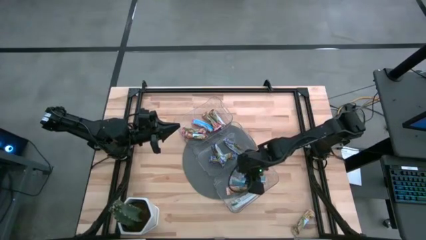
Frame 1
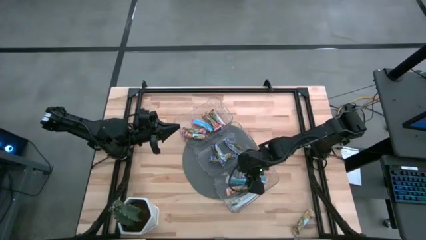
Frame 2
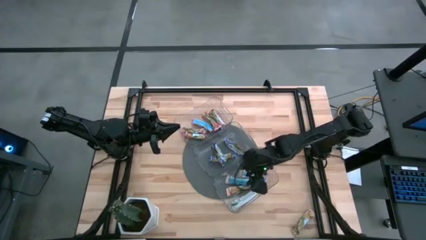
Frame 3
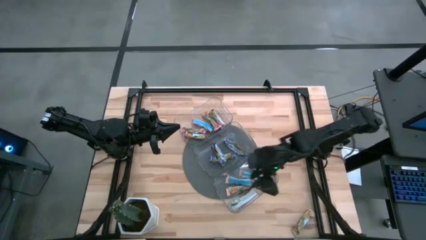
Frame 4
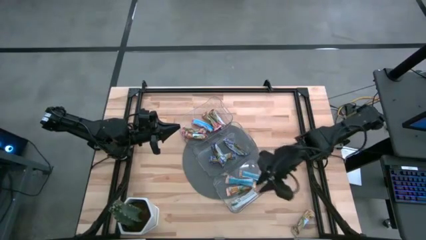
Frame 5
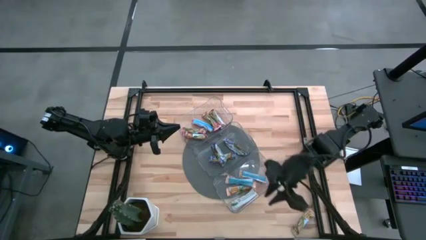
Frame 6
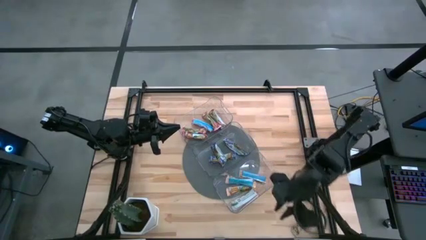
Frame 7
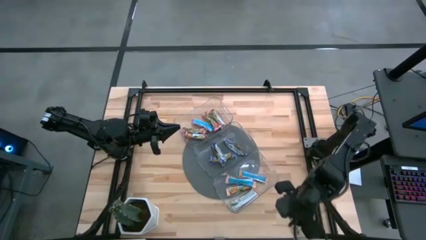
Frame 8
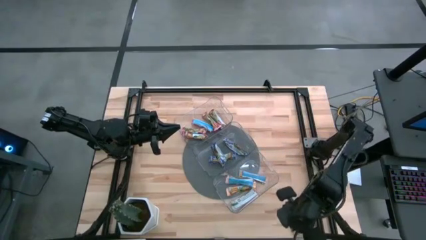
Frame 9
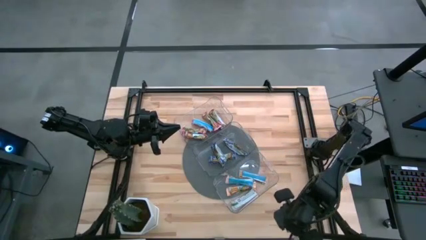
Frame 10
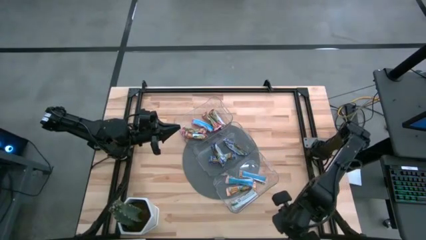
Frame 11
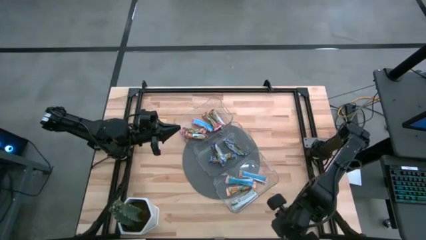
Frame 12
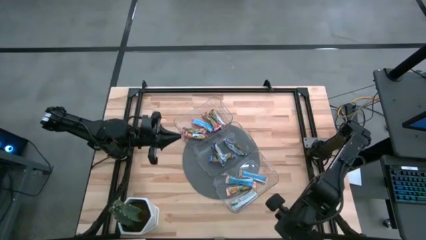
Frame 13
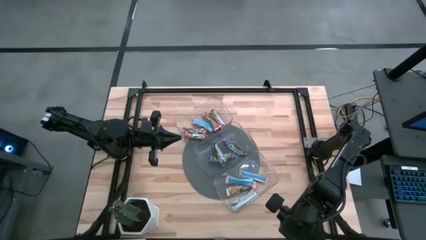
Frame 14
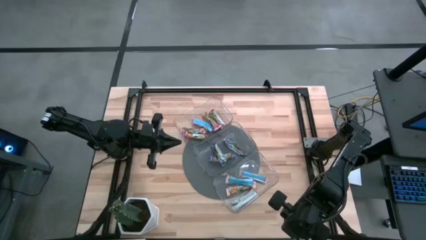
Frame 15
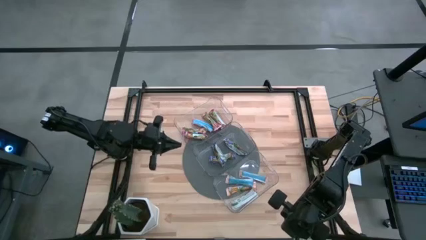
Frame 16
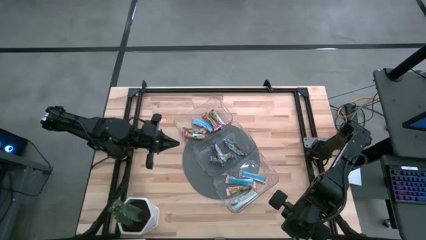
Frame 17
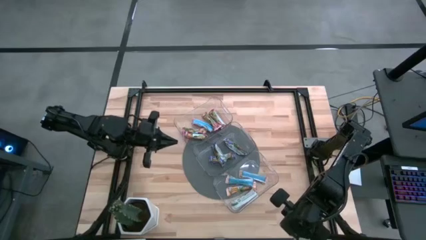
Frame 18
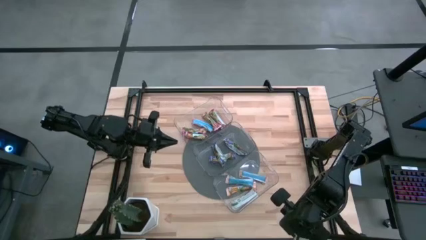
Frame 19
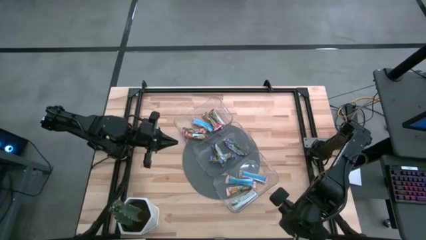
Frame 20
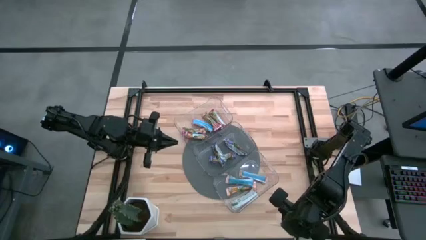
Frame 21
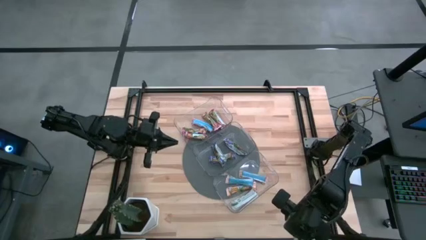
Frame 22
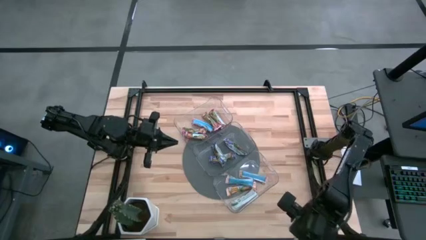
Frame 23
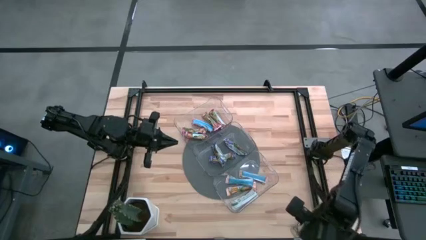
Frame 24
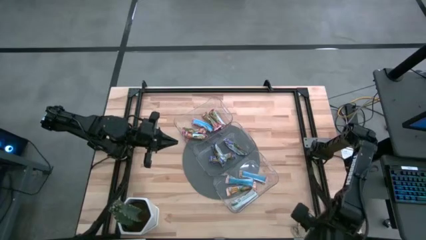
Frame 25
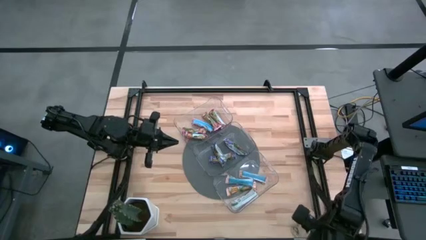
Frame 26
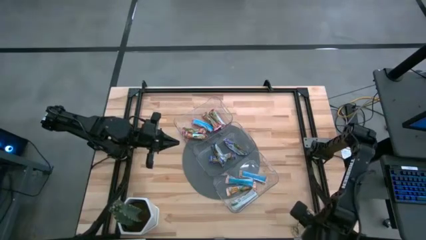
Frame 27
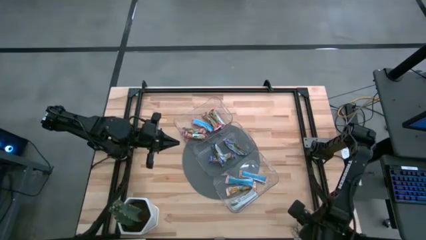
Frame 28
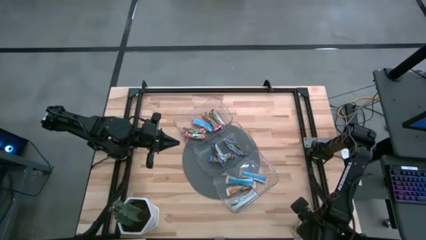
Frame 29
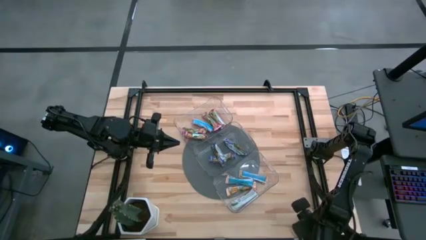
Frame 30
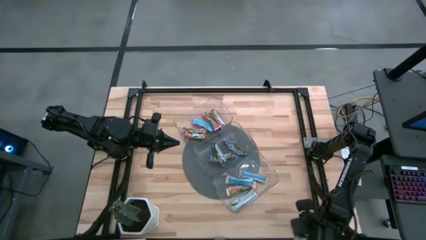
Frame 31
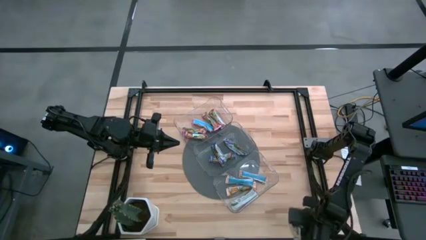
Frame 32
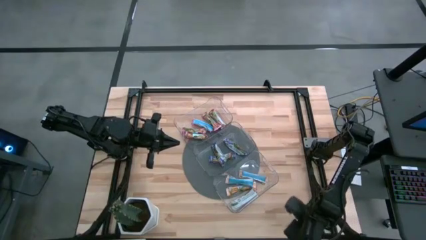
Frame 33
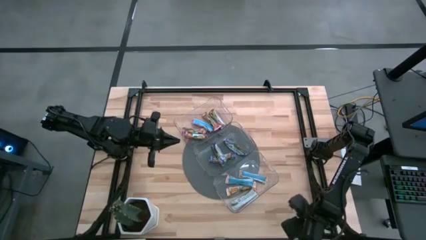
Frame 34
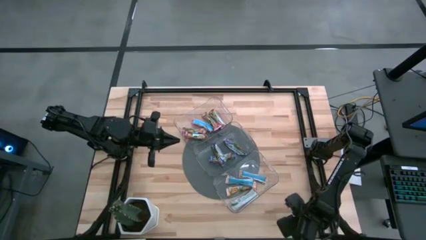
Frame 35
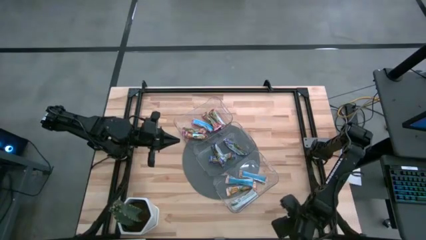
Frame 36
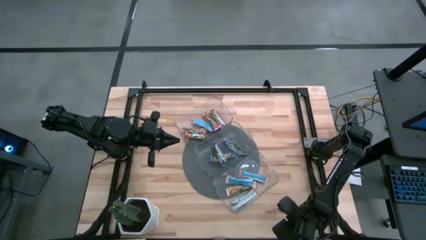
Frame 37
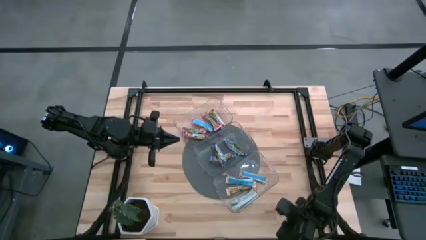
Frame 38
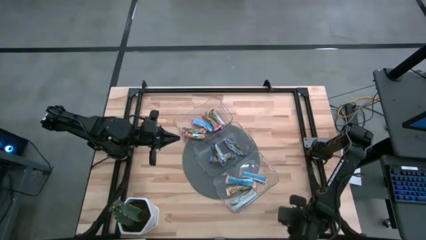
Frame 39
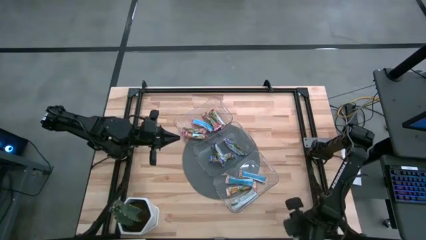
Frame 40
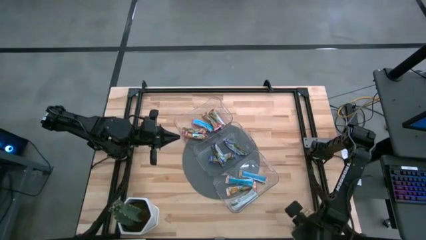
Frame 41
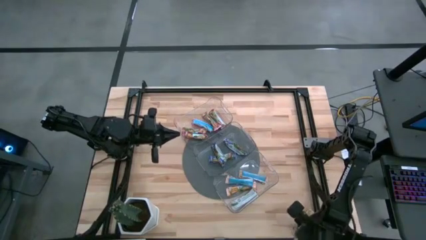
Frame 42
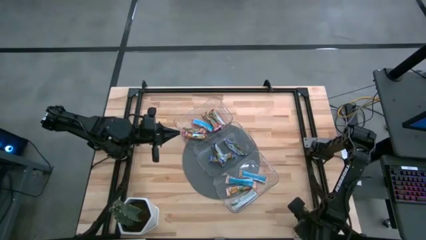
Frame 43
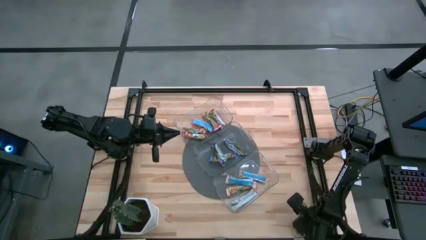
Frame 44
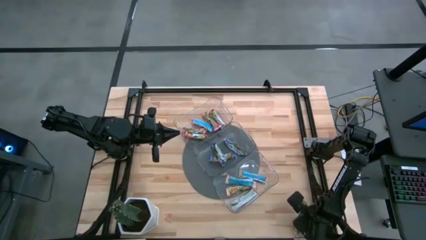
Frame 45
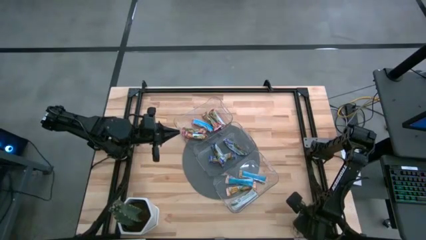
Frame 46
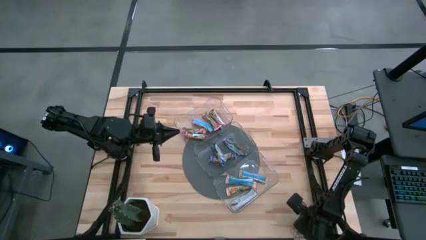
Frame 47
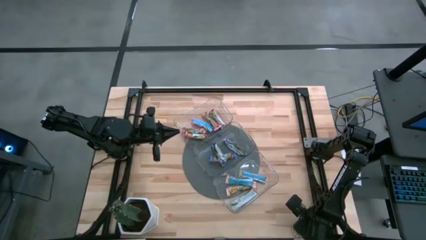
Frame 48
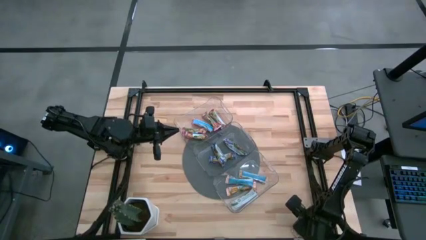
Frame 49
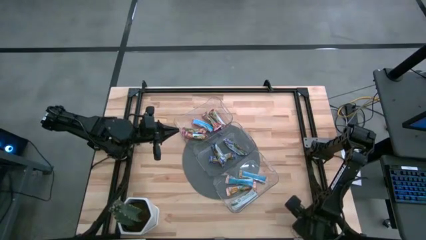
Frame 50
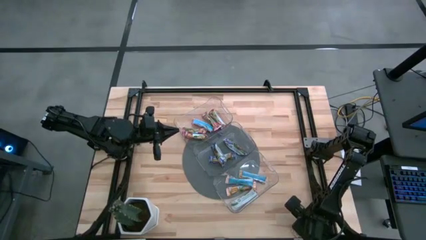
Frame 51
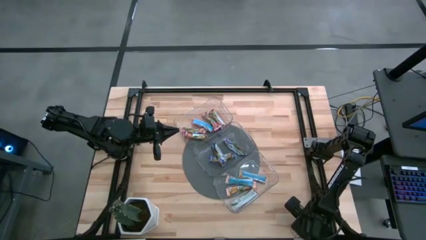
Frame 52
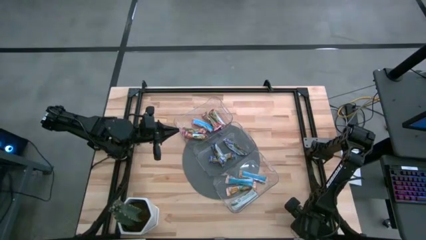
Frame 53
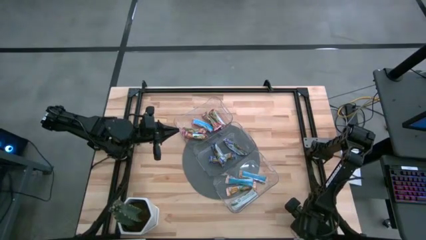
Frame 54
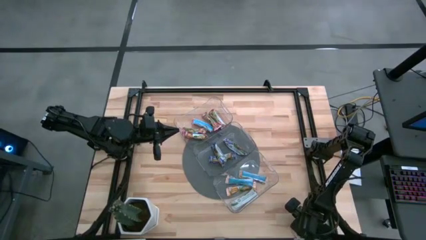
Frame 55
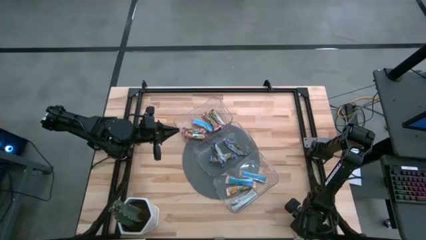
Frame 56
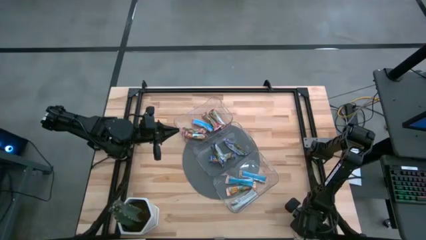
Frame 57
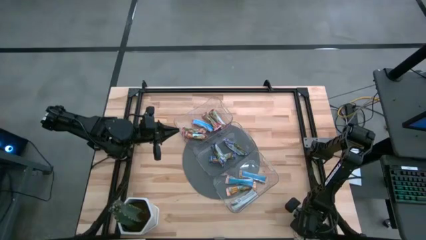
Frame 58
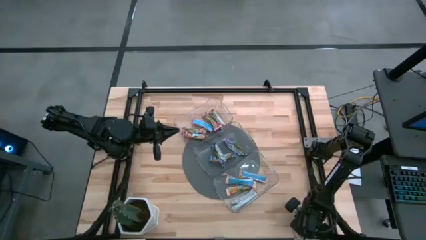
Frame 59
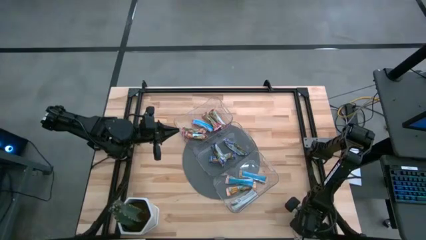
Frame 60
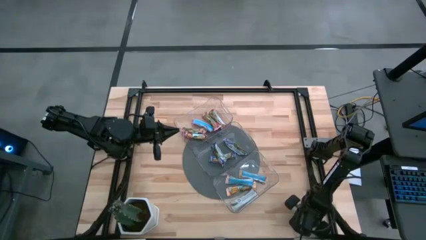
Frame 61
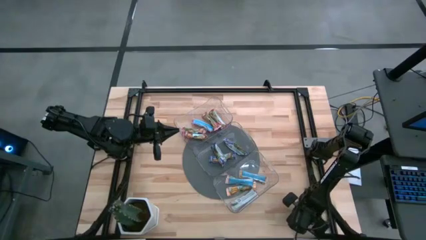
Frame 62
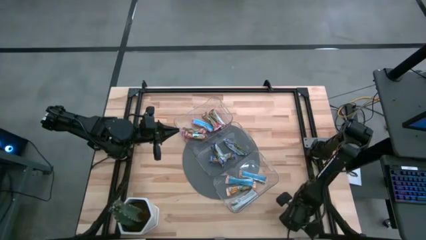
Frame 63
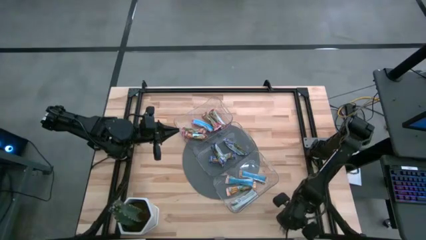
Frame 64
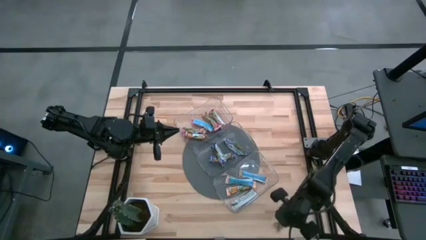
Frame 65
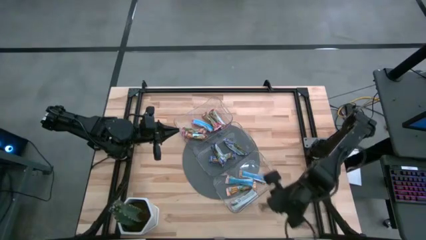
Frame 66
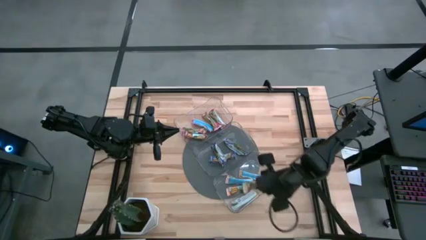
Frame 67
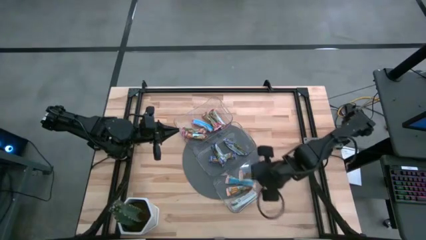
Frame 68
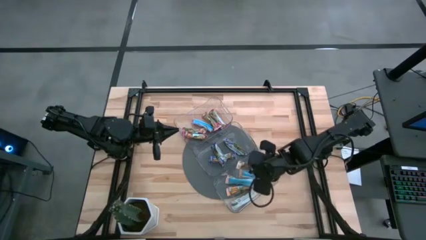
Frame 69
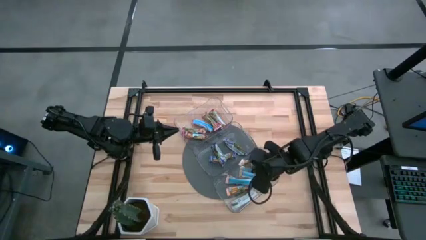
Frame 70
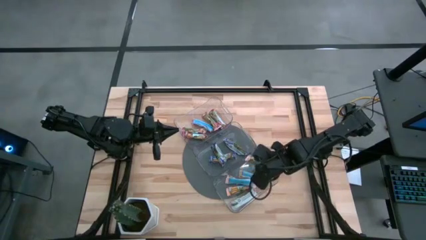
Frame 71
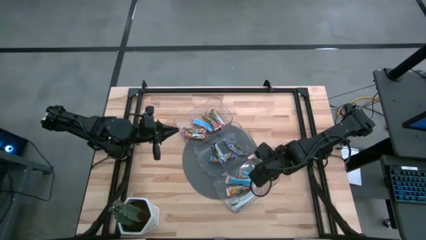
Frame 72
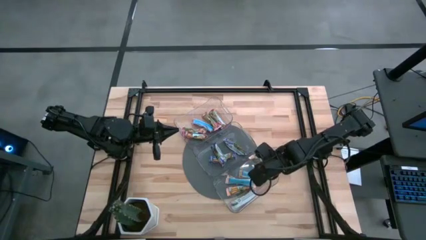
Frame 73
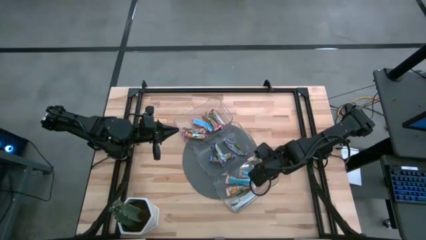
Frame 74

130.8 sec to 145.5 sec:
Task: Pick and place Granola Bars by type
Put the yellow granola bar into the bottom transparent bin
